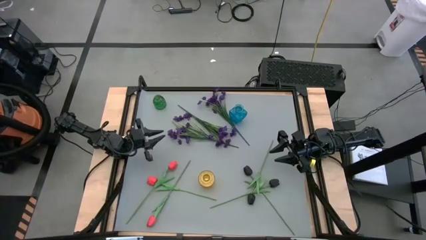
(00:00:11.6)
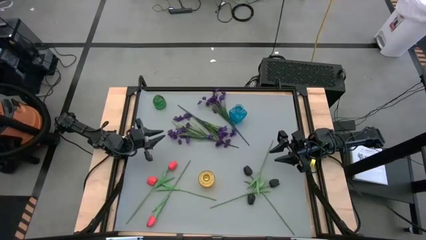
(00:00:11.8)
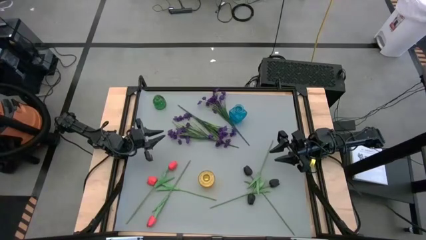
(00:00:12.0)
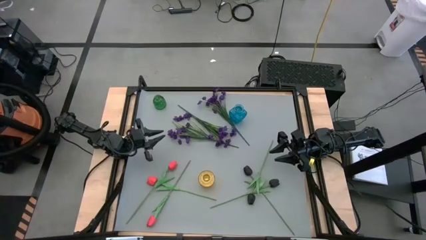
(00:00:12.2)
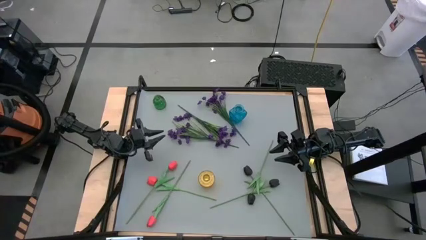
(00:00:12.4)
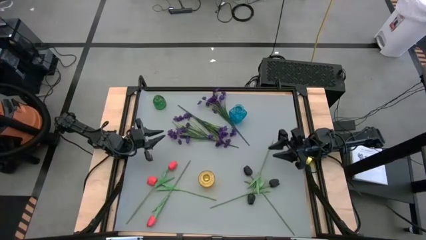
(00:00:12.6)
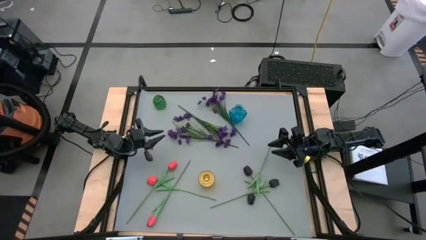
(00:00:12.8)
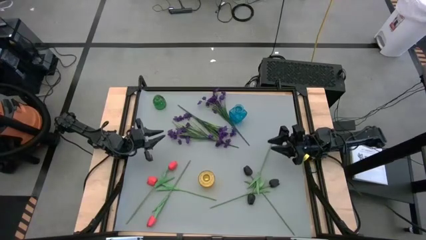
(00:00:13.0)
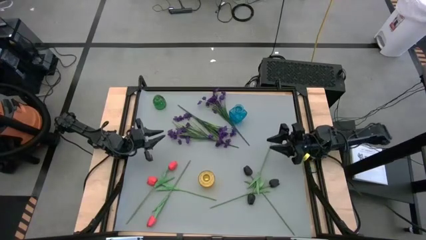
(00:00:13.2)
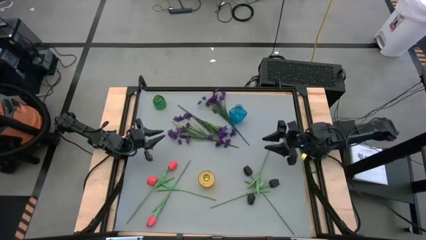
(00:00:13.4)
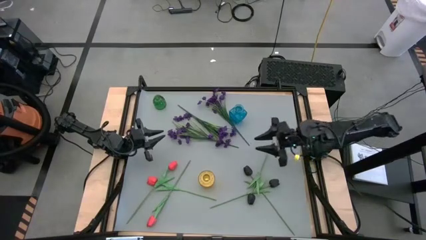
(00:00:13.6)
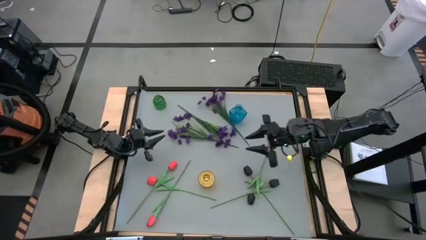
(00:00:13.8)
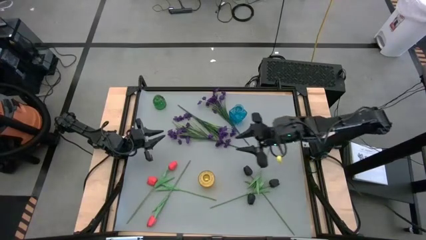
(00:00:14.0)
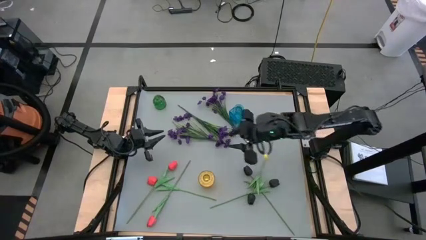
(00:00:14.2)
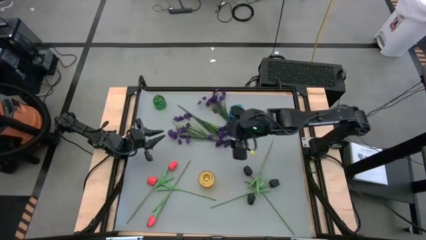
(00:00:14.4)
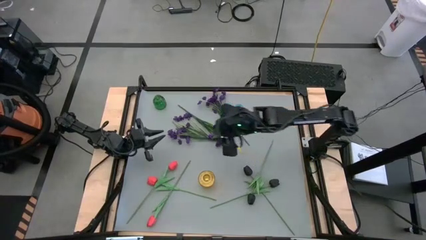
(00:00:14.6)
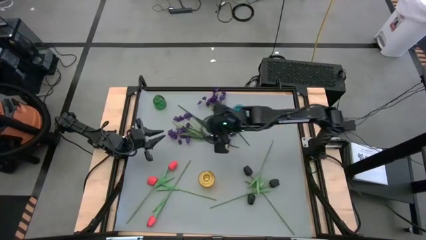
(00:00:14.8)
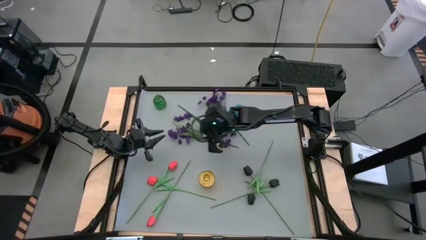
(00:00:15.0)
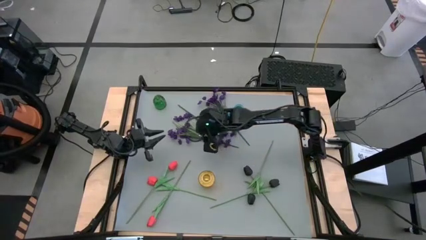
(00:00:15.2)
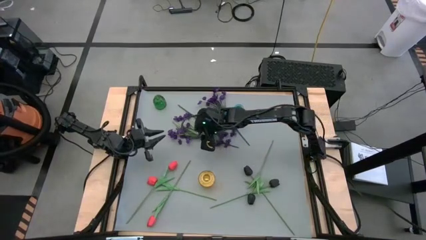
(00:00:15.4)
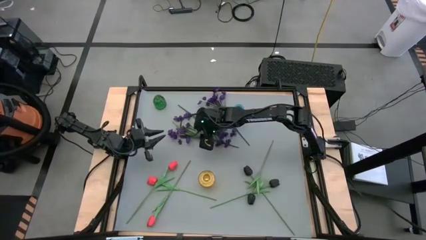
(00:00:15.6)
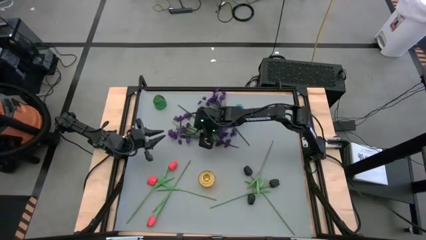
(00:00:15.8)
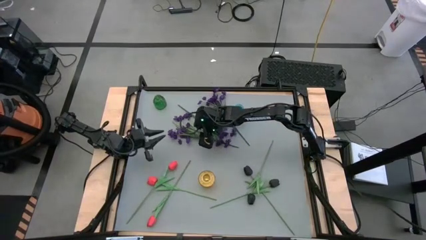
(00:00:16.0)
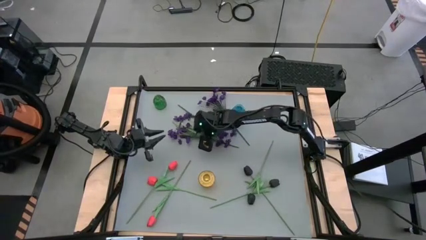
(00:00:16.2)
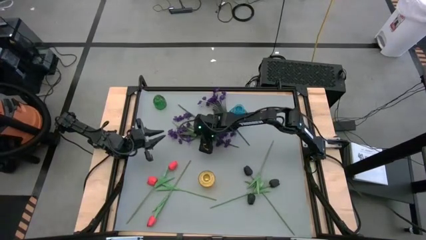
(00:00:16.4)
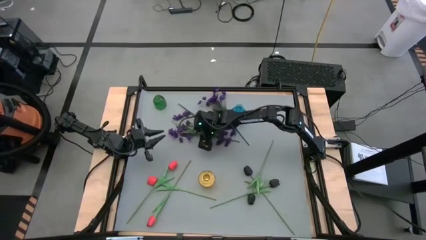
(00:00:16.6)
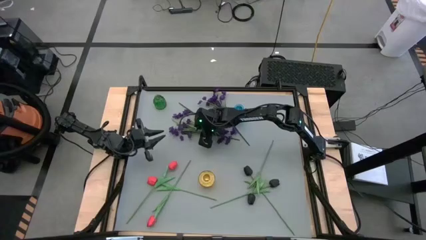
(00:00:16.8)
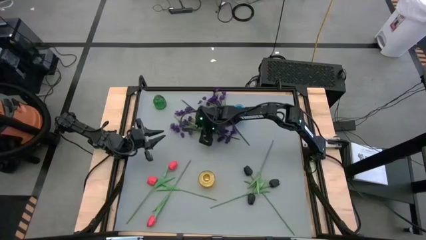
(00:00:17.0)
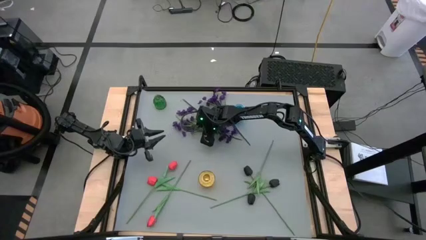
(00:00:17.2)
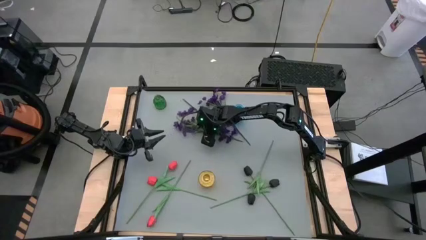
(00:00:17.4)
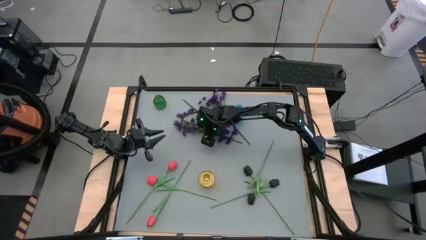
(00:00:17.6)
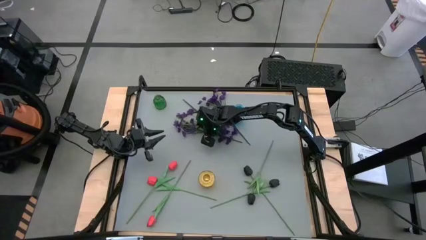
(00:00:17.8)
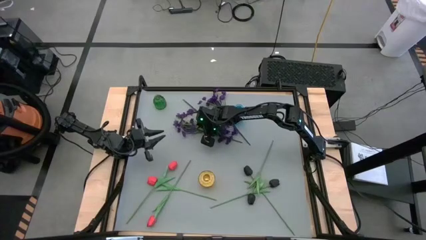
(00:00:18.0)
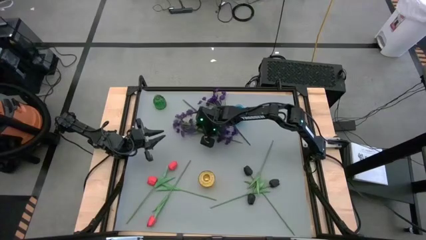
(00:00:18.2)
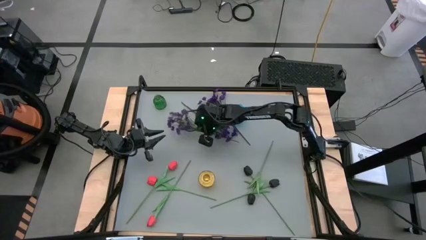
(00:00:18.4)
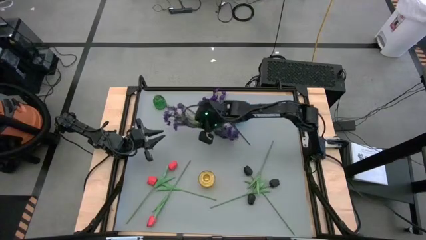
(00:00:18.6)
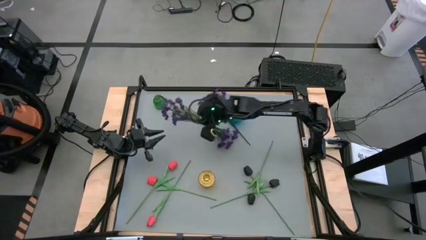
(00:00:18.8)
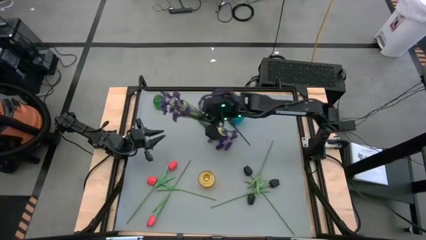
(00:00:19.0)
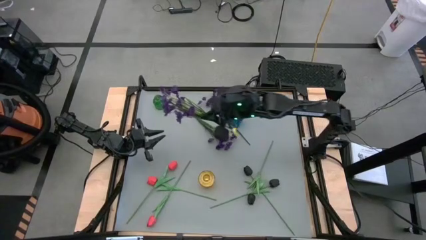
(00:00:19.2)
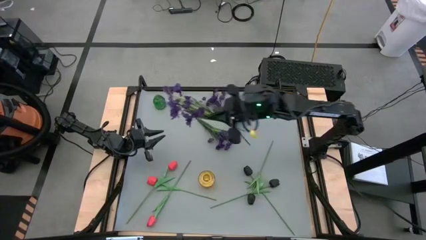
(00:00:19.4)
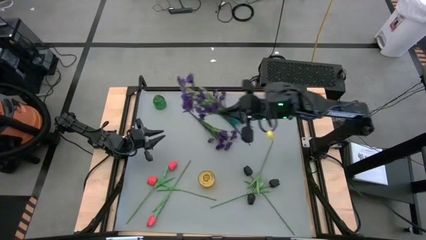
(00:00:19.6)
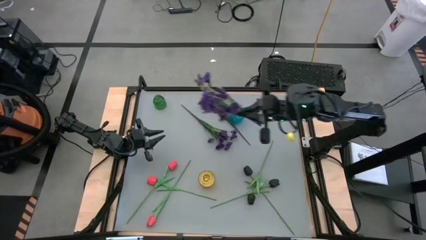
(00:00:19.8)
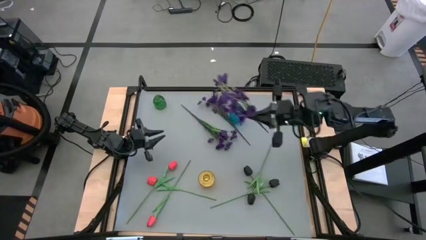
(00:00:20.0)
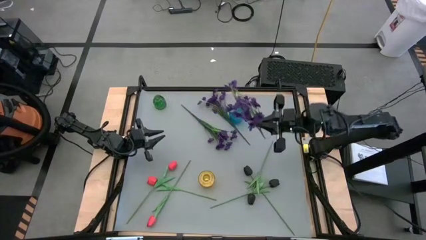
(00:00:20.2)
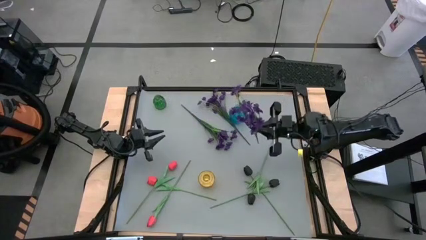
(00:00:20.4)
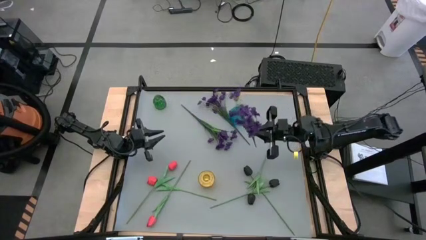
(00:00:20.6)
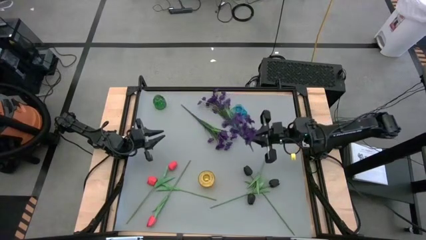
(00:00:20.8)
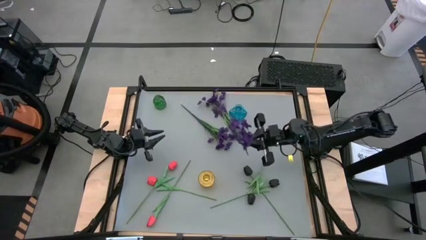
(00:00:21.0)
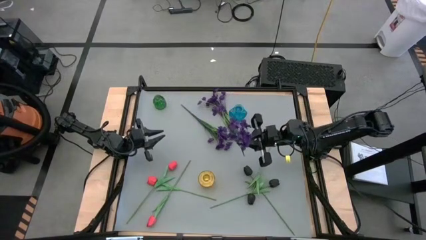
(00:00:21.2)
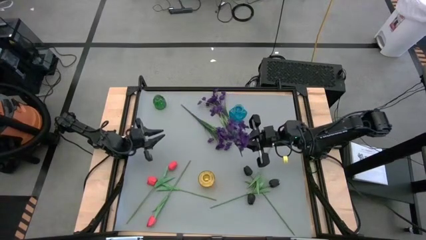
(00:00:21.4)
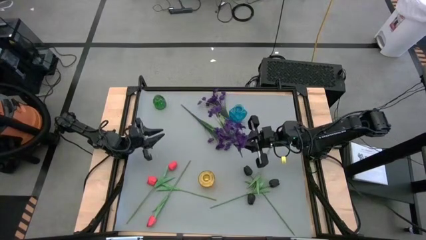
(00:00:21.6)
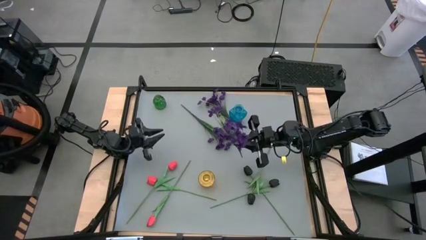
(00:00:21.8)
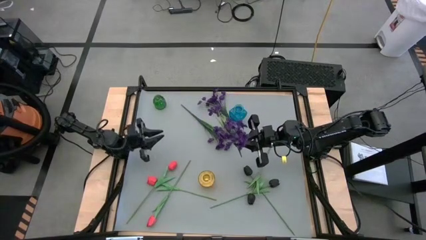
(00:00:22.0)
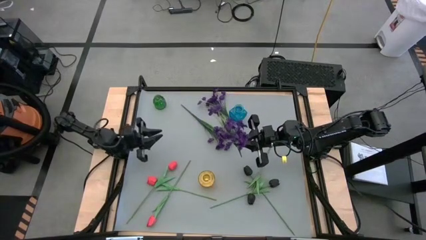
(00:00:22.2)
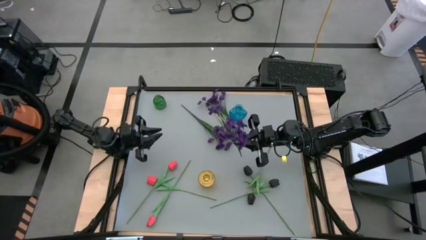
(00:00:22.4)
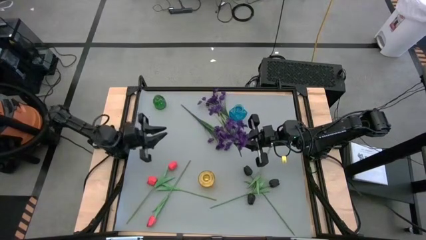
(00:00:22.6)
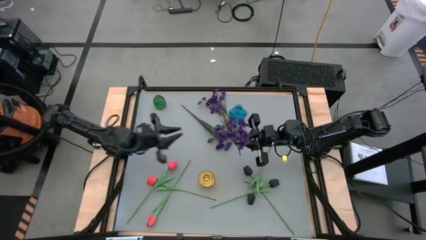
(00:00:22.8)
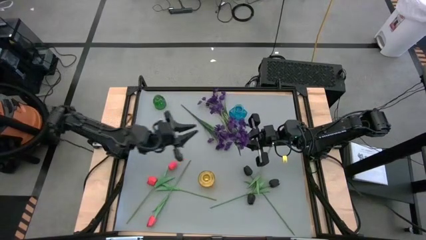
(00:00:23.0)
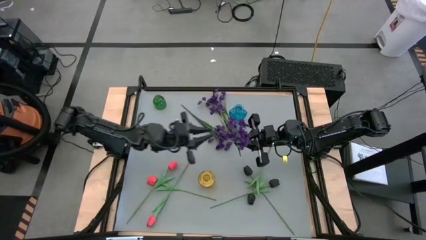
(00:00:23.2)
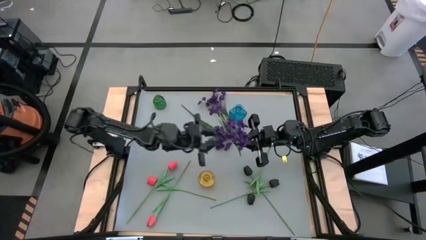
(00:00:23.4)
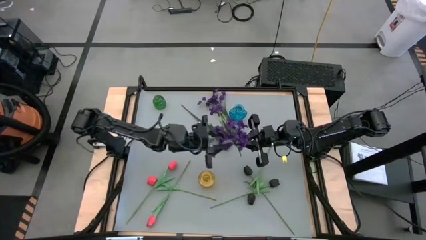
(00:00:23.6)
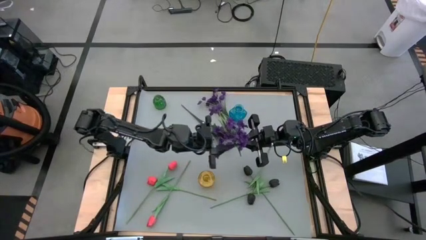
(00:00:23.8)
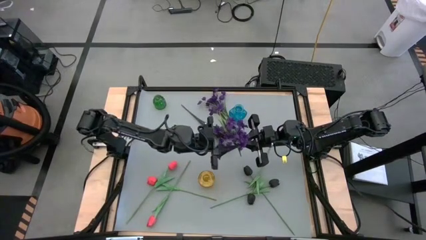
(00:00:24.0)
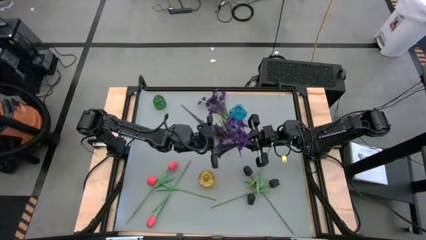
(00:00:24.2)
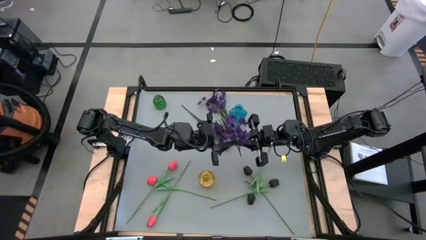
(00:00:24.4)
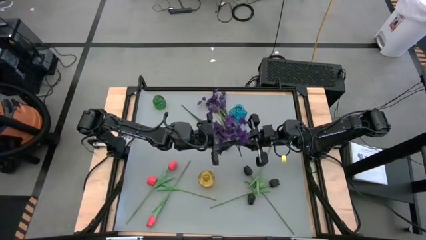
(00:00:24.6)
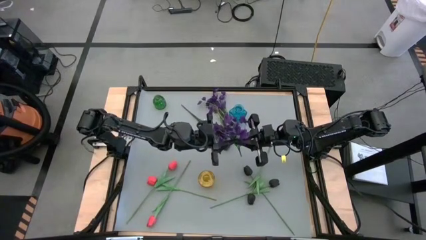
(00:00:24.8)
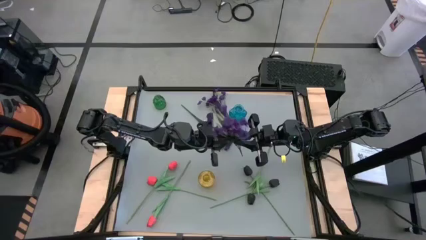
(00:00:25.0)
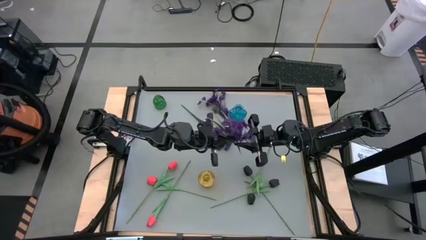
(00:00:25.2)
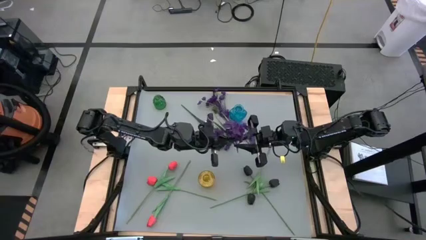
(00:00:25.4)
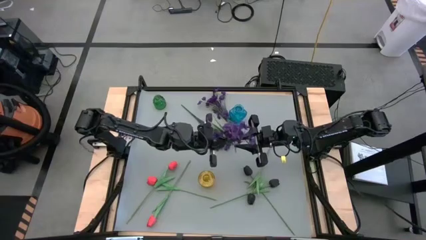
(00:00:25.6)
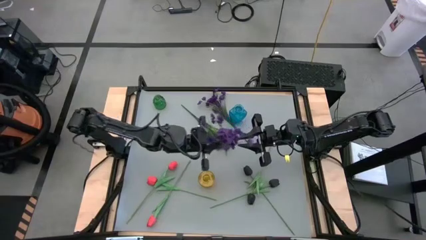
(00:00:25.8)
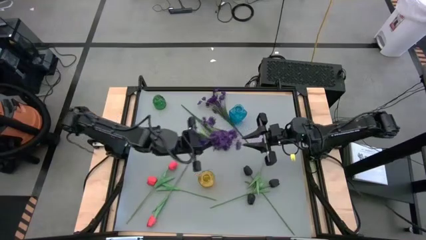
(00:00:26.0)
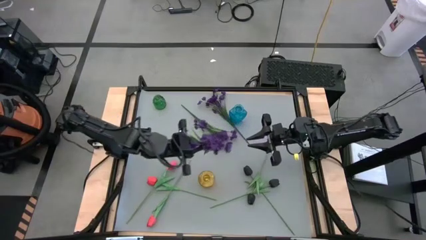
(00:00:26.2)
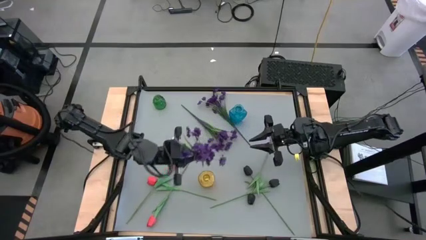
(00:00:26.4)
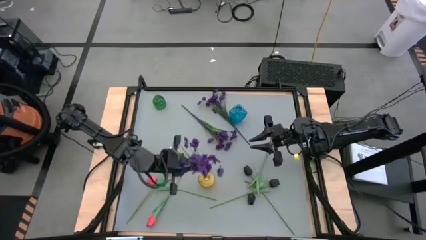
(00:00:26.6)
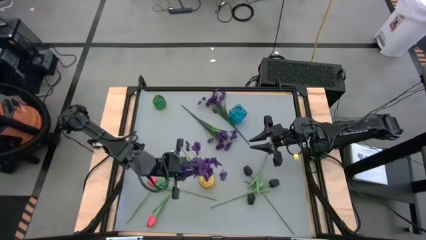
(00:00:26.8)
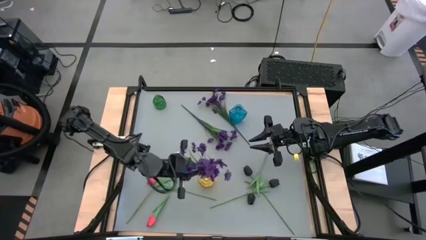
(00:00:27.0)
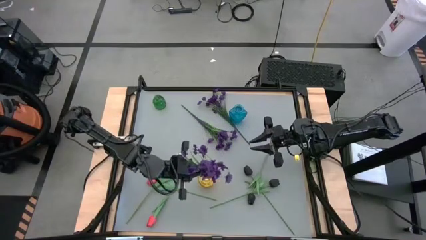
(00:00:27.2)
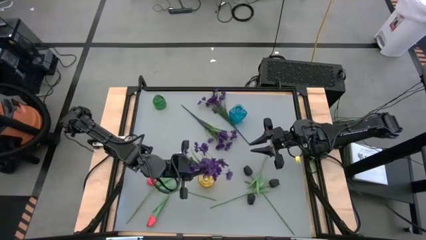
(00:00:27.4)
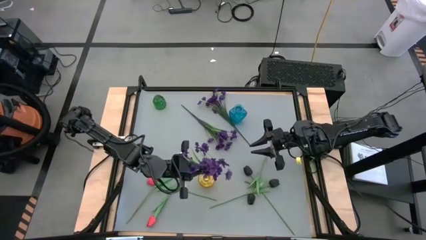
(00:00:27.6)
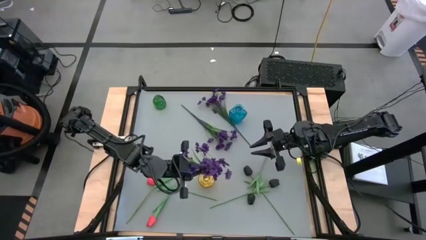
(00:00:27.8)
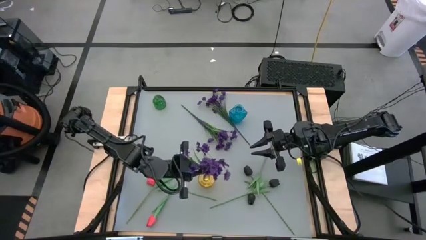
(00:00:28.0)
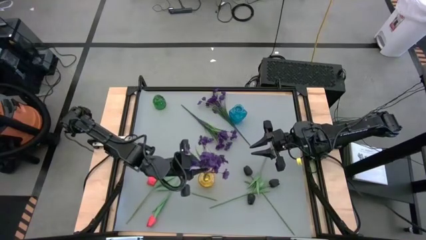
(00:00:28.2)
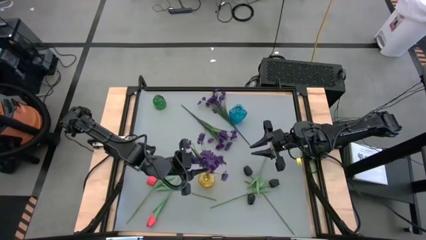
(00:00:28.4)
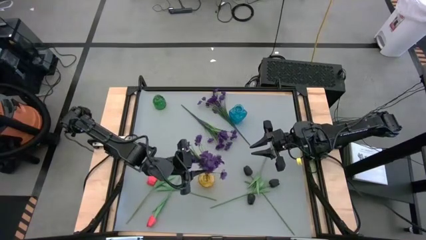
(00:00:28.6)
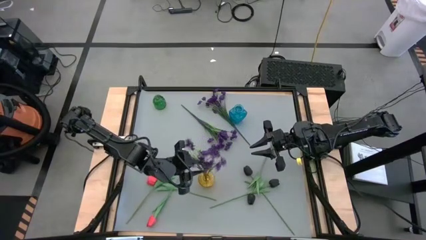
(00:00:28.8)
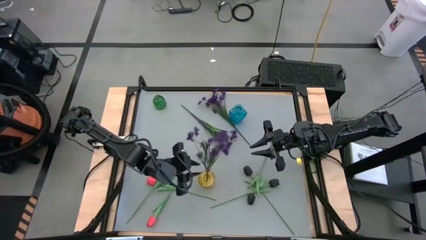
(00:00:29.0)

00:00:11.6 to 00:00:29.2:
Task: Sort flowers into vase by color
Put the bottom left violet flower into the yellow vase
